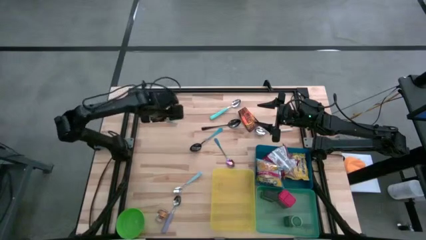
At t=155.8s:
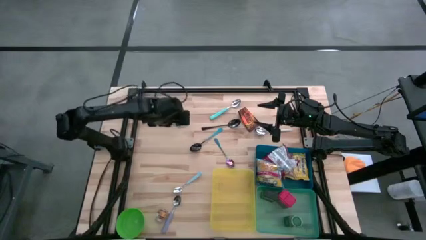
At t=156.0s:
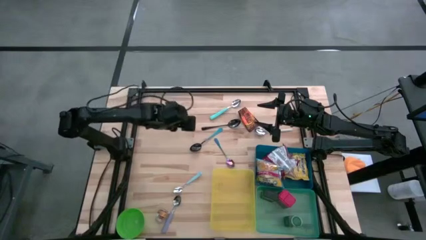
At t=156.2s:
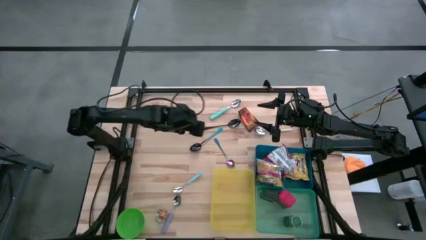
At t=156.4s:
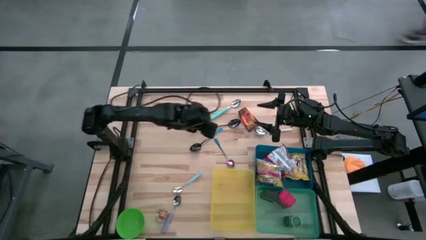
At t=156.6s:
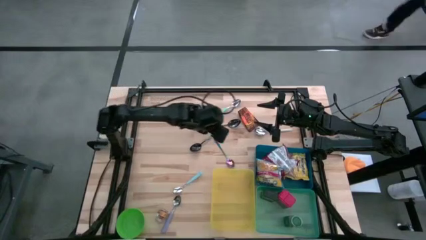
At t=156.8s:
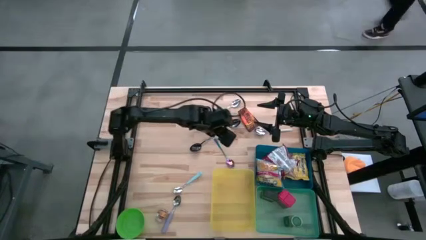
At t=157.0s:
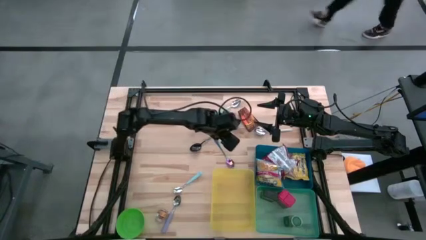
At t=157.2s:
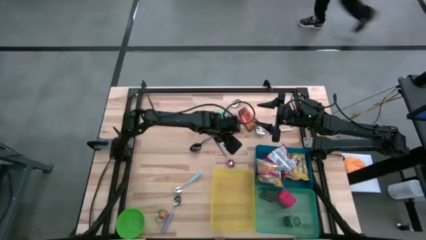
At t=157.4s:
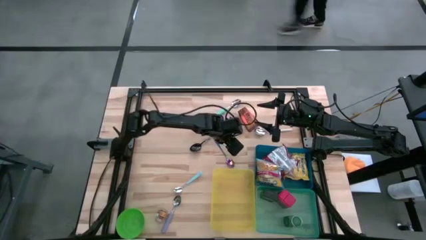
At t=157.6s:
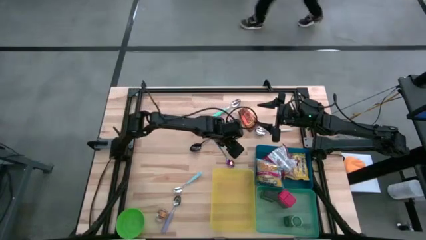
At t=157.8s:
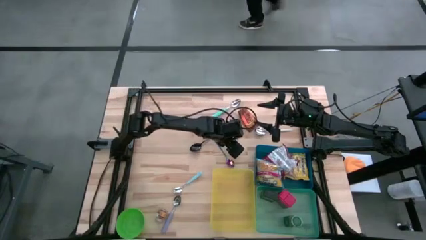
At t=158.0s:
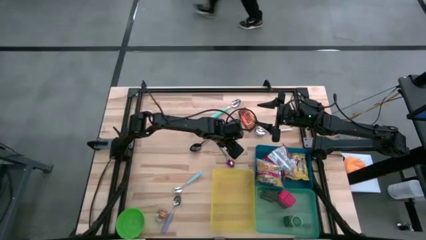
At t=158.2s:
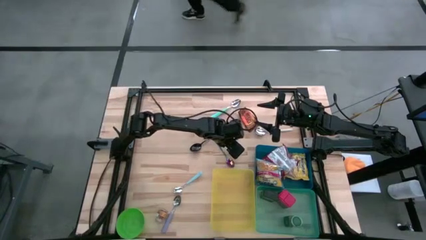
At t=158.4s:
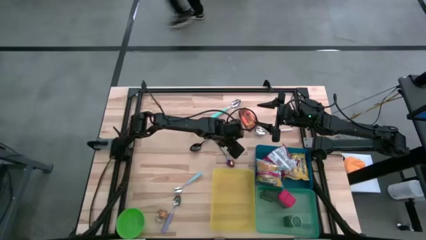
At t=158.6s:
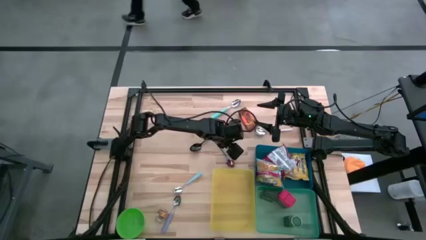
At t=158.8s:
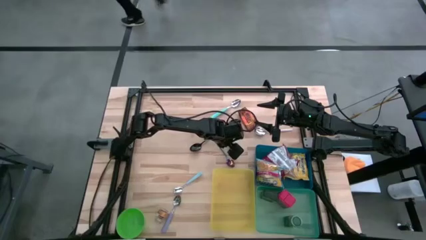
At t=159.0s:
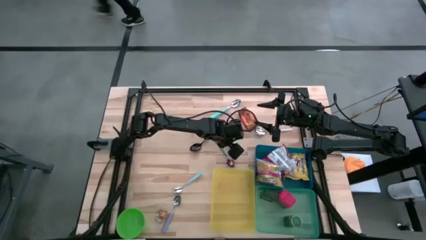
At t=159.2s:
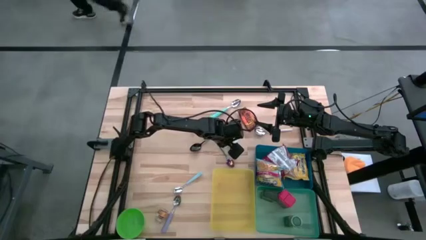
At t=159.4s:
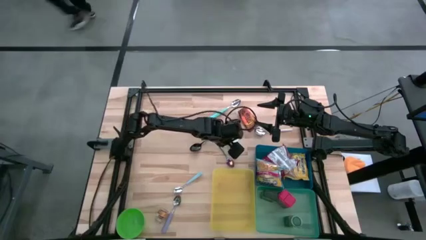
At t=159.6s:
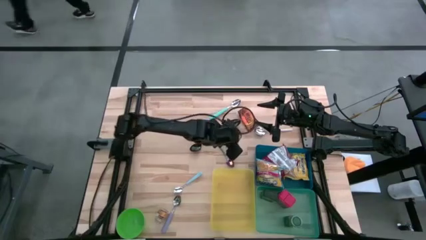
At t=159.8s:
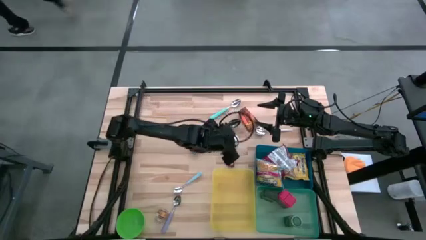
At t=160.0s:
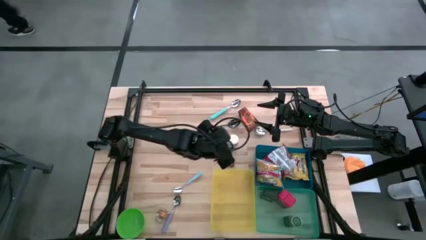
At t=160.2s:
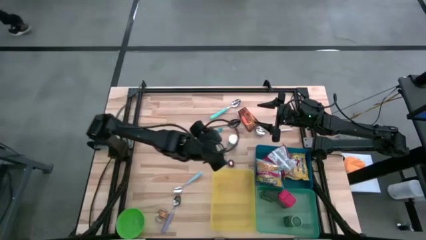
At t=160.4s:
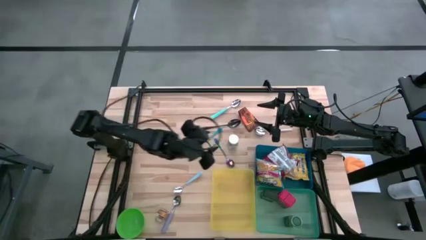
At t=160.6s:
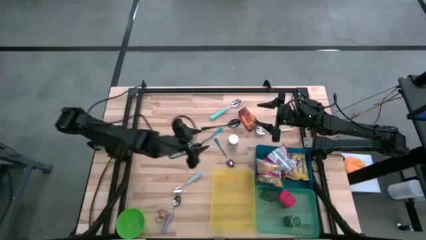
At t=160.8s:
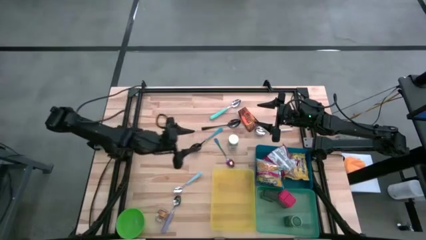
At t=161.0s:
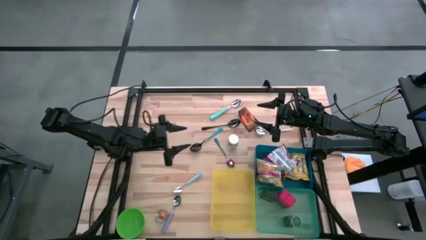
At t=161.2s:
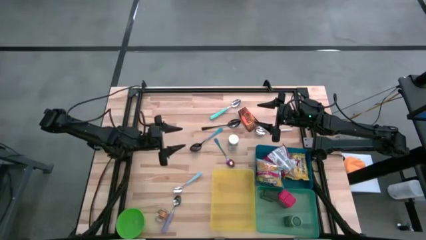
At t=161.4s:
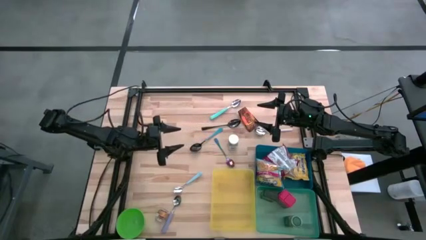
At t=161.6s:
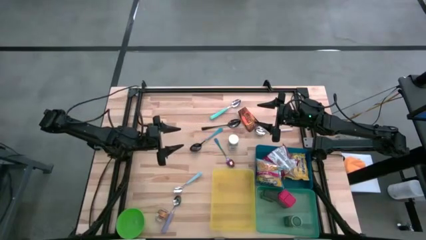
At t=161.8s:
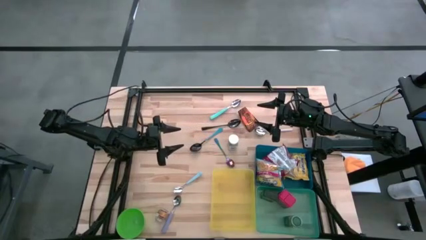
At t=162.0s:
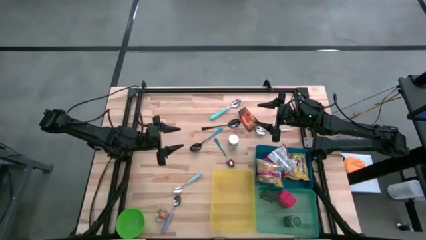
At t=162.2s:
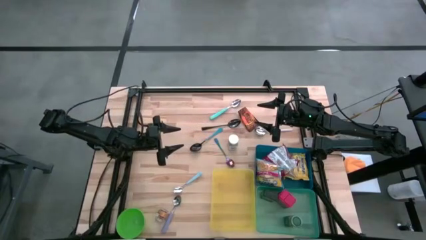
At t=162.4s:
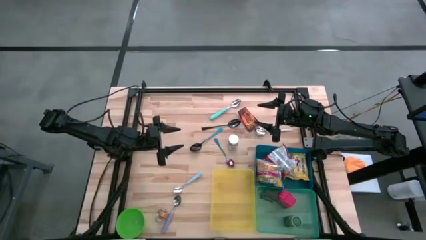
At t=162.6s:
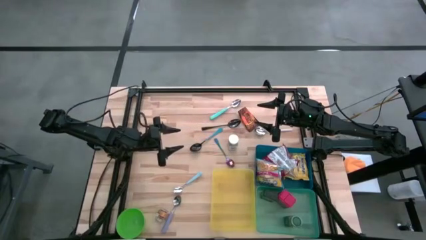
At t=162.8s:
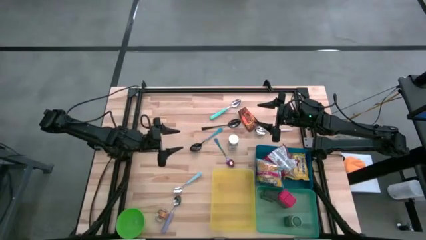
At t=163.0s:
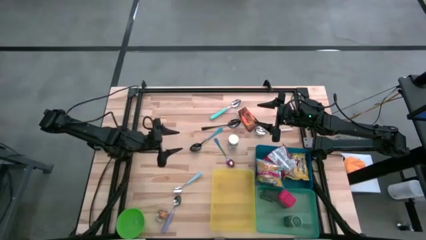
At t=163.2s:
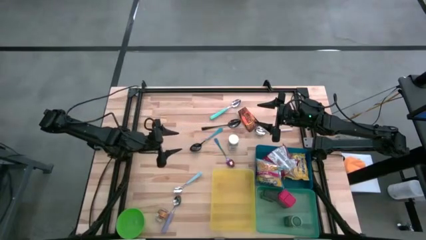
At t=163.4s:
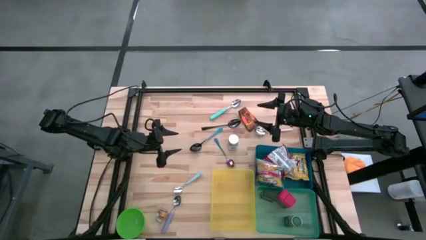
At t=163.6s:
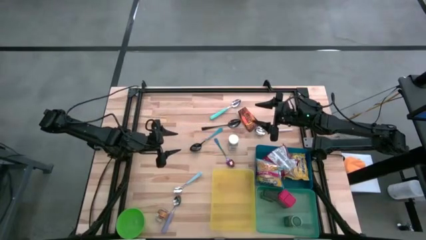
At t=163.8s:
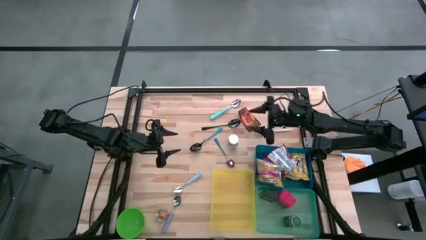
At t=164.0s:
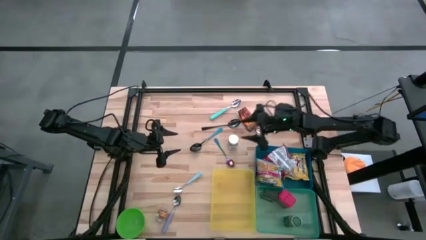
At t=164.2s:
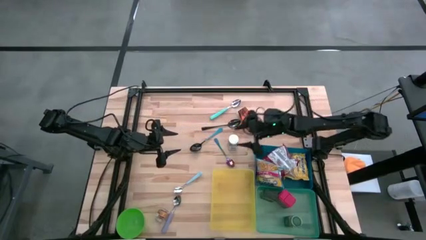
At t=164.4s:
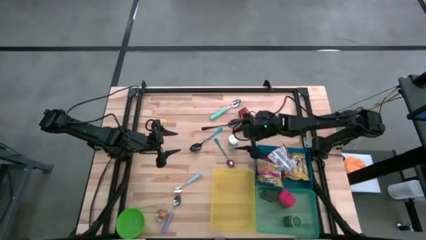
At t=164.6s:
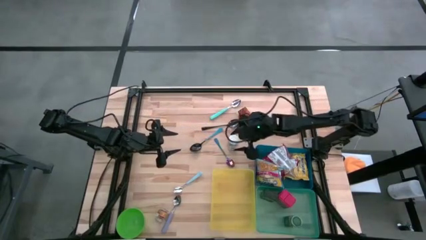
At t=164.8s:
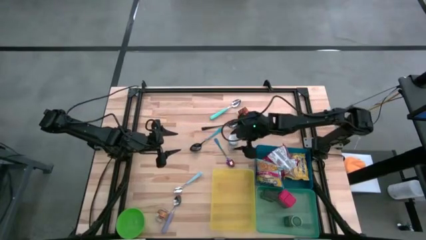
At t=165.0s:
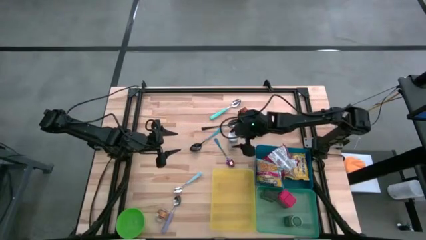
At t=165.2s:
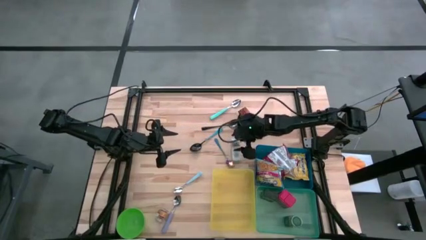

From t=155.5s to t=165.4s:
Put the white seasoning bottle into the green bin
